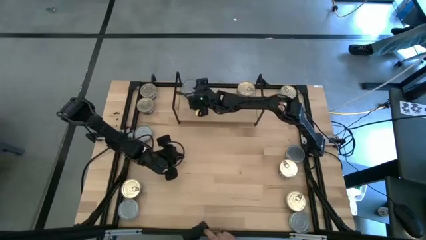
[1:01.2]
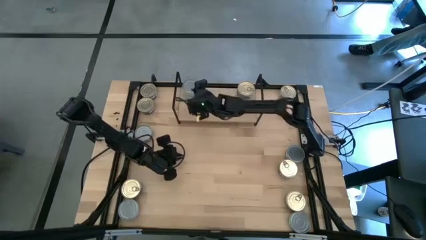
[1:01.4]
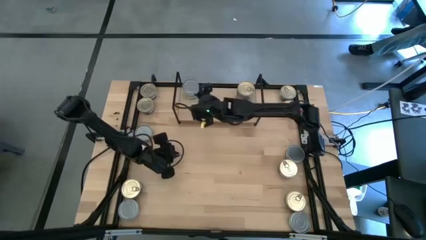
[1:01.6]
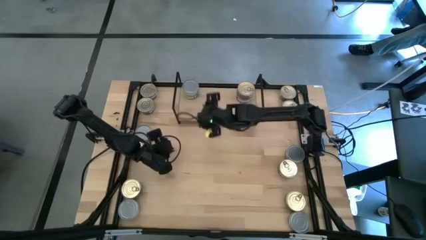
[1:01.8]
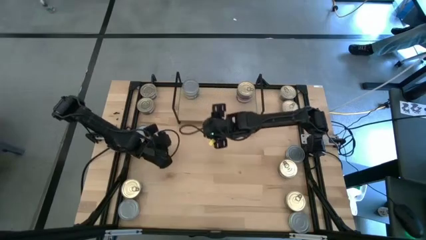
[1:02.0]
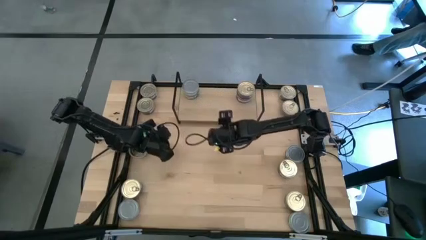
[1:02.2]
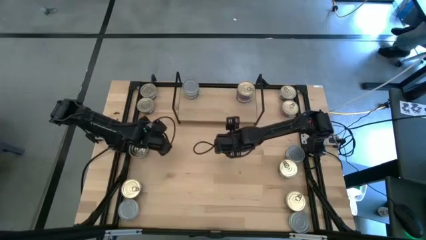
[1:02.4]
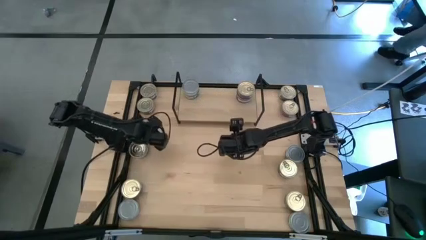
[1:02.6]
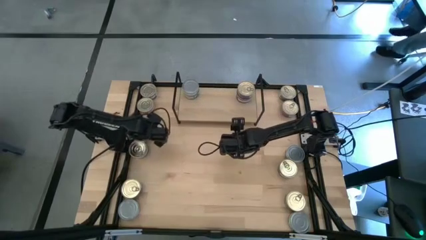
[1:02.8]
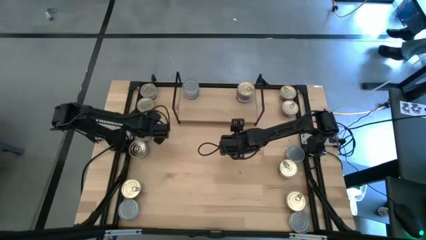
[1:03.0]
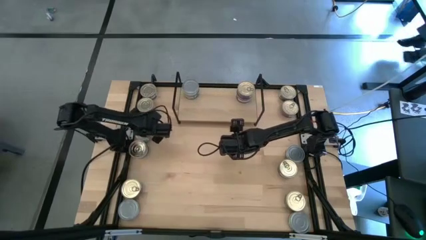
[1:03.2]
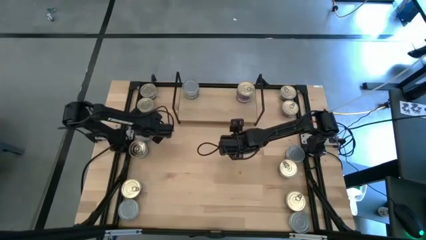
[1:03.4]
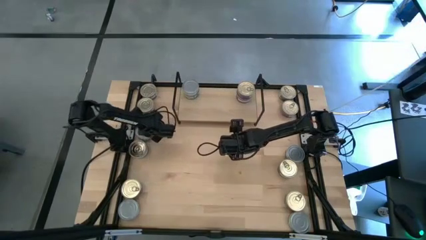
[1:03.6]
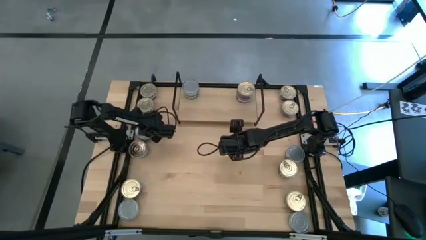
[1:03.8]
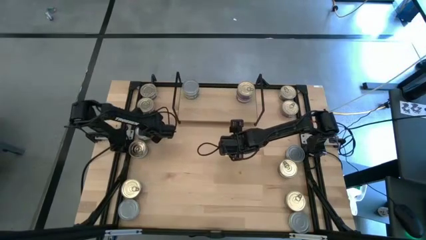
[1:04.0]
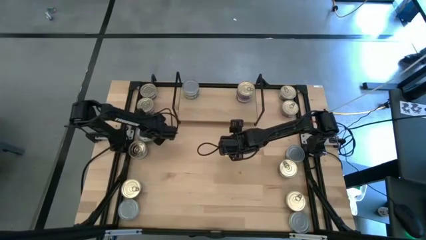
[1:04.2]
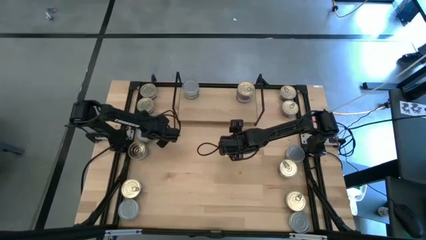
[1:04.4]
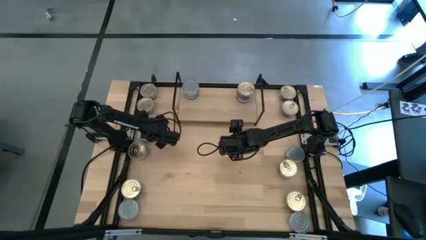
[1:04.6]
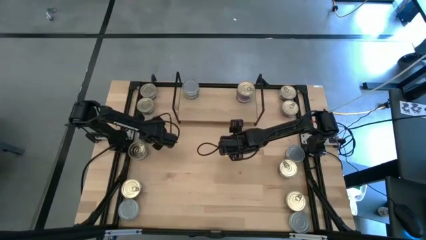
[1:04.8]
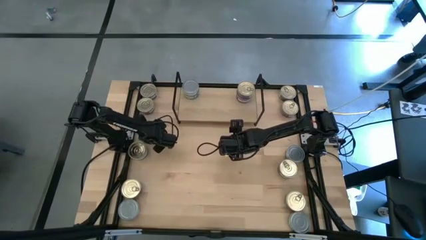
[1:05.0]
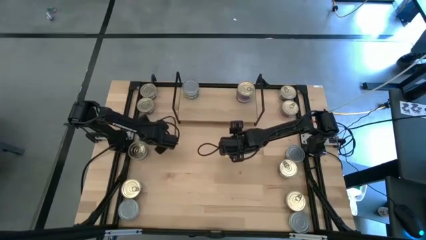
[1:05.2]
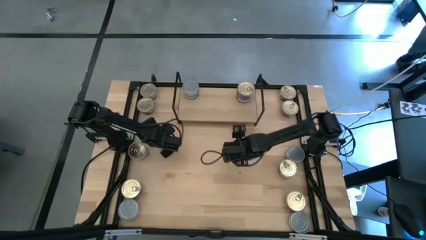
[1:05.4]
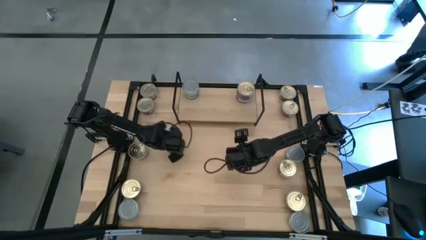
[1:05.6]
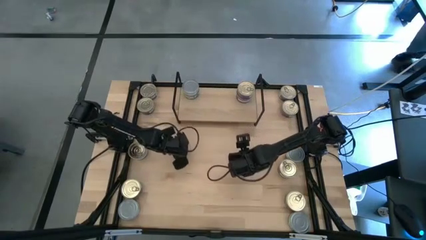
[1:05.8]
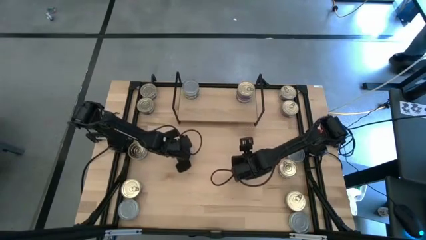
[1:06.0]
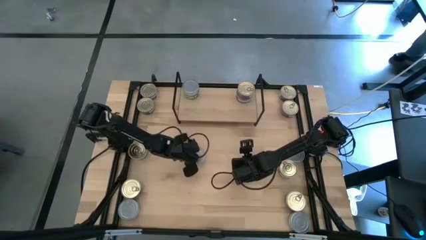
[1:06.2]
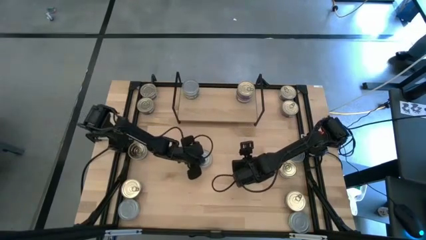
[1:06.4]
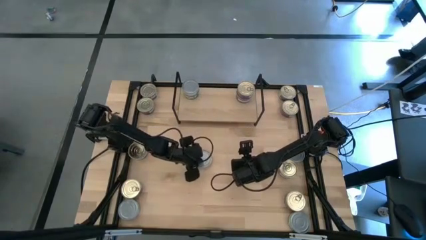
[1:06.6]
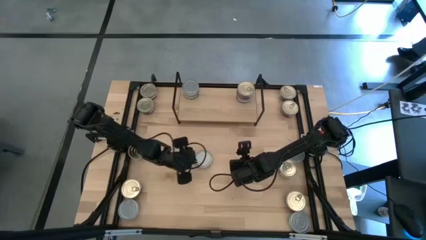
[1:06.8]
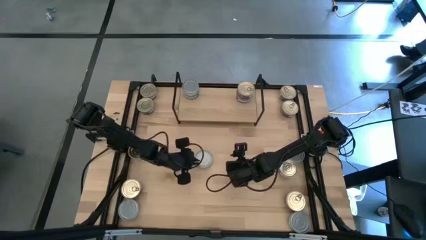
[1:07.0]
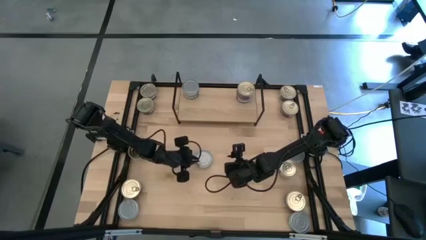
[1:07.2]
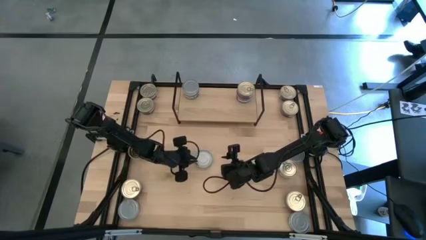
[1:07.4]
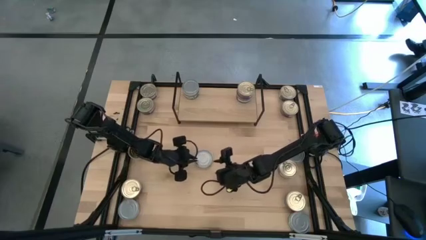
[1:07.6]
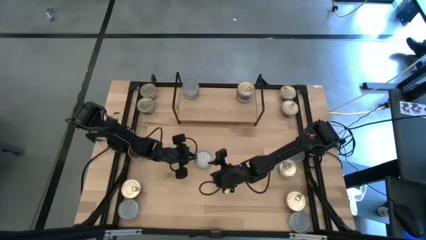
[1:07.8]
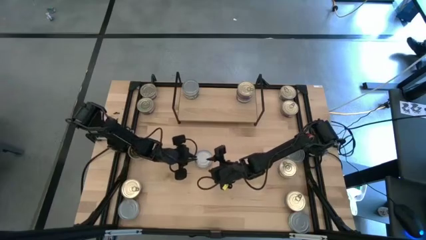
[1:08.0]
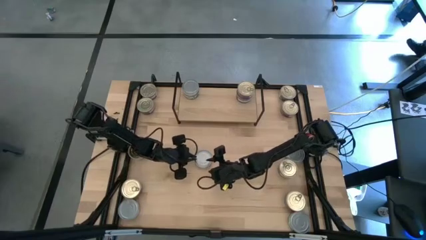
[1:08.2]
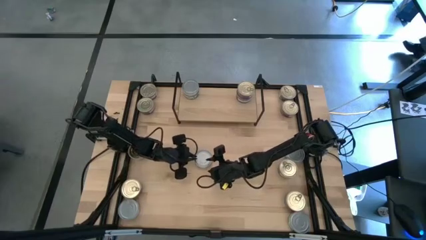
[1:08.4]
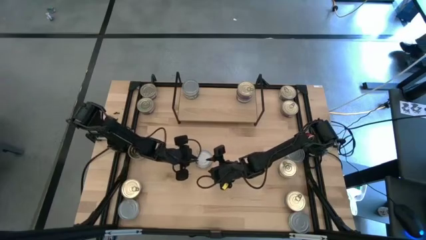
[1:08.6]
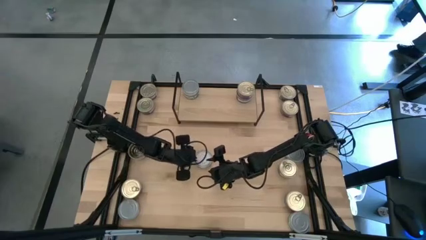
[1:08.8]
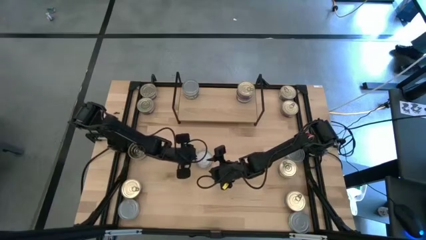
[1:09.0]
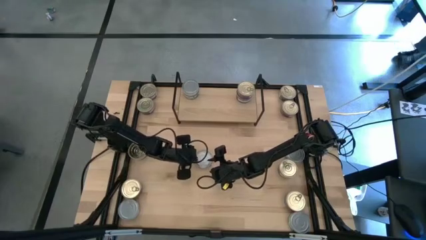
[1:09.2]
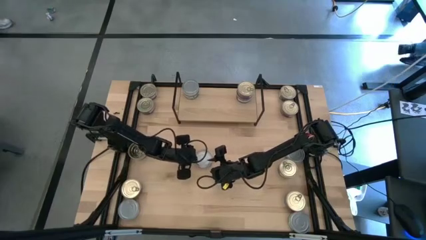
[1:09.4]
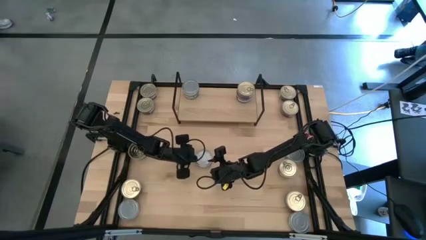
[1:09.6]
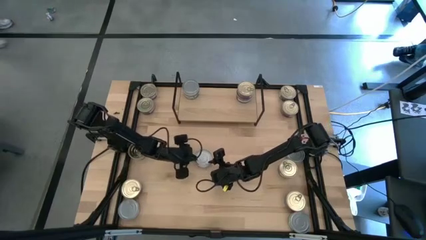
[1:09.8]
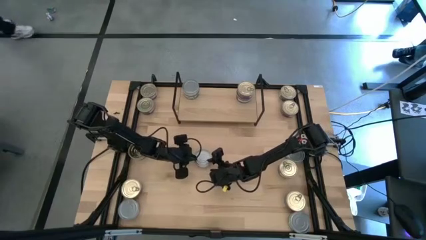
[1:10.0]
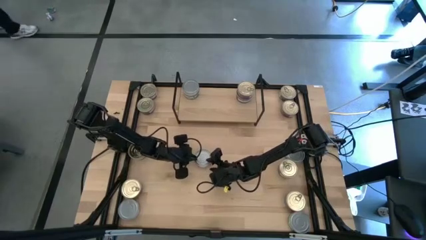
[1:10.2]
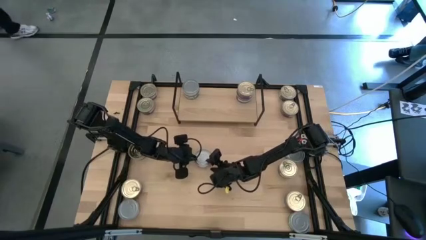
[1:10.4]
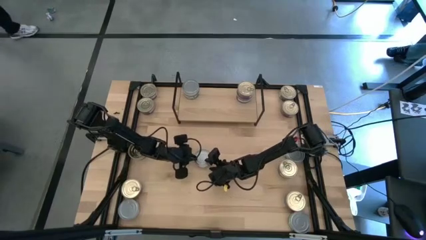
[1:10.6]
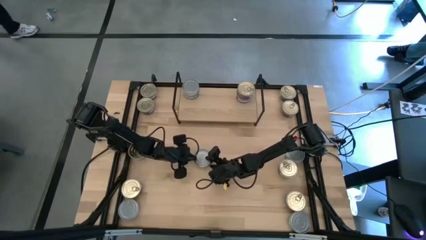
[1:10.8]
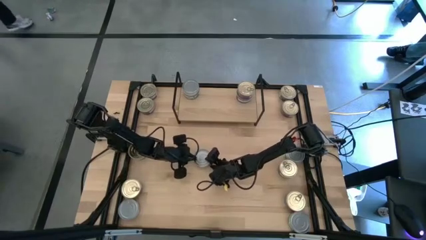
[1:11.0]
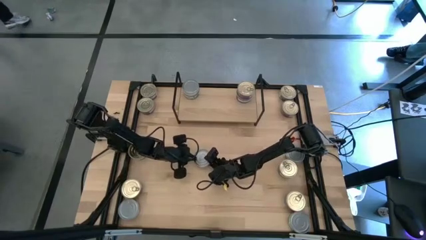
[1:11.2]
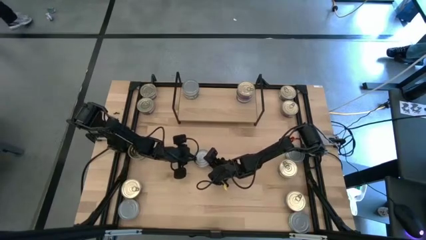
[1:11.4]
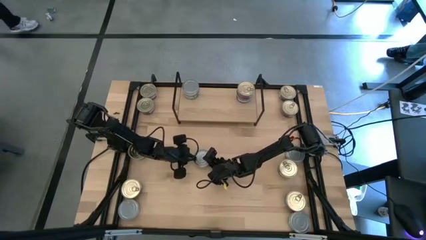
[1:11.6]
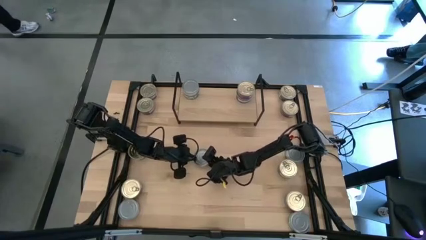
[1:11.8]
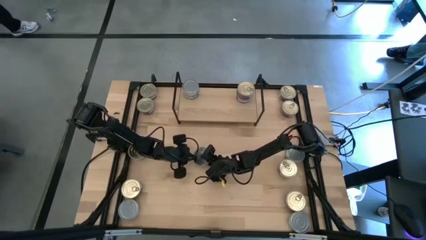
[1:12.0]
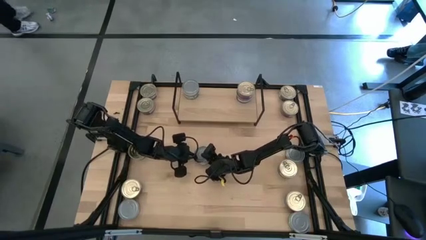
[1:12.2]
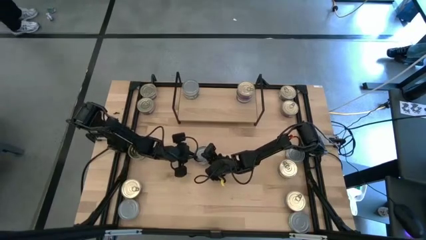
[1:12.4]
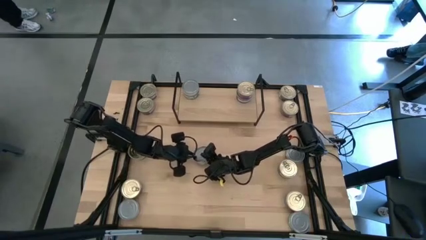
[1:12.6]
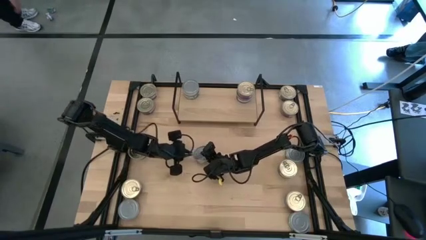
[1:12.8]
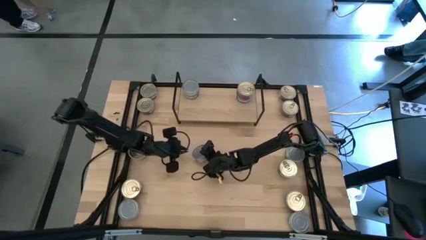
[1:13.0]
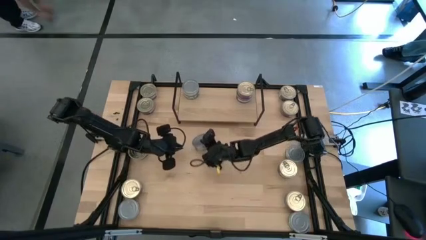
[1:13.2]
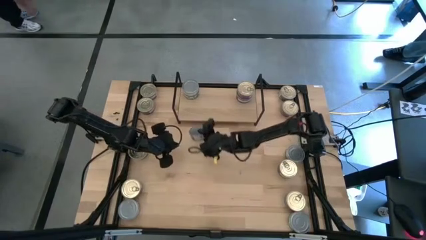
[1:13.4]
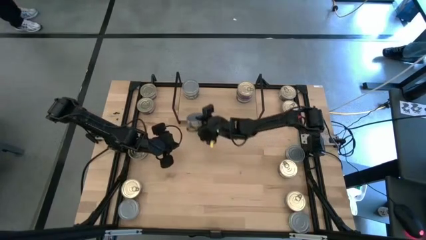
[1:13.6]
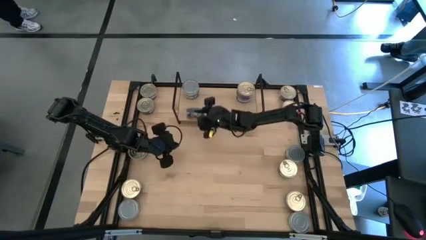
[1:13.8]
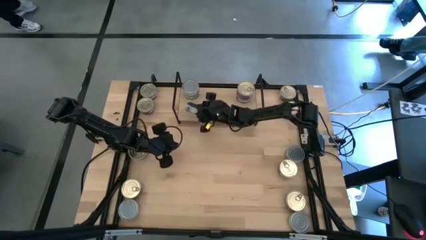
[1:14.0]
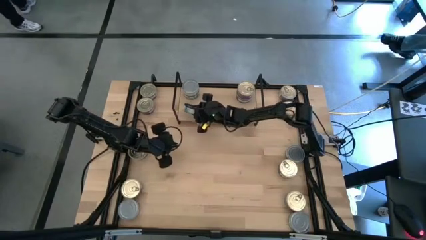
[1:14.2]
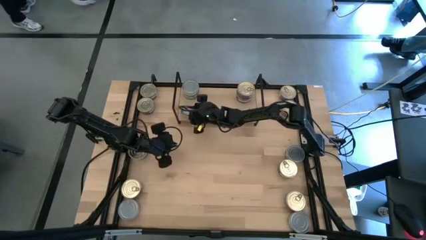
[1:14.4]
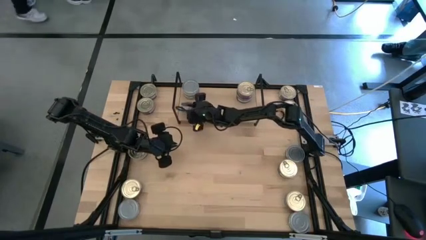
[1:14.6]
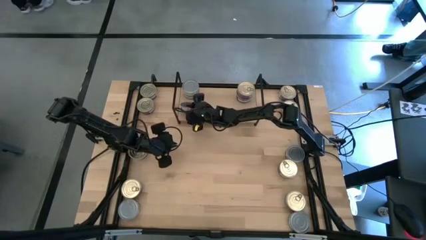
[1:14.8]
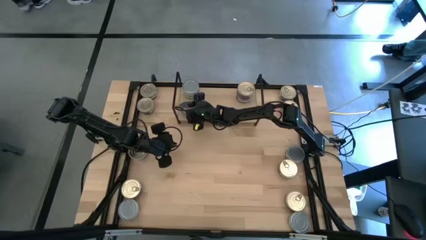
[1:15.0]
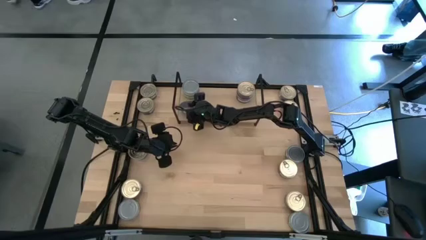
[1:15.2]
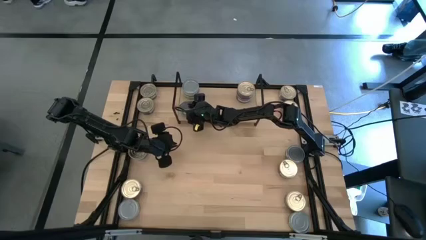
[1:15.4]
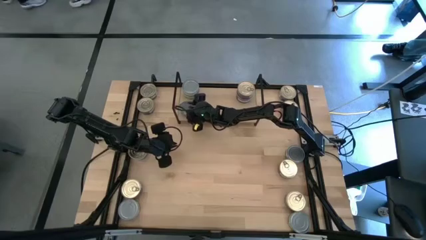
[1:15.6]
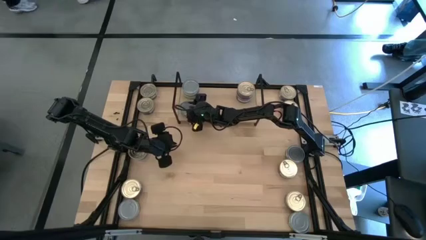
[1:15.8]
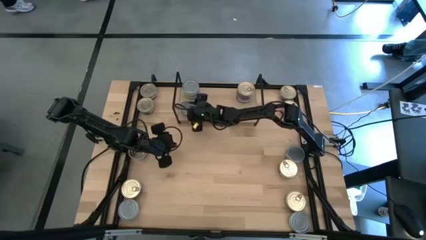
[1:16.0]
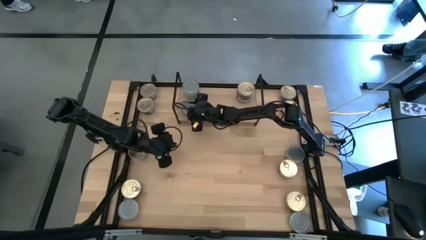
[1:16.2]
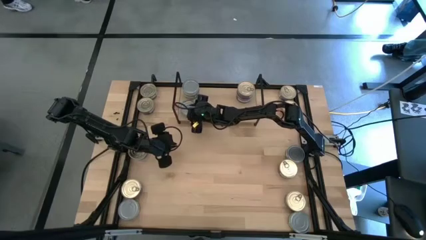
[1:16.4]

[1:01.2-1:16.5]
Task: Stack canned seafood by type on shelf
Put the green white tuna can on the shelf aligned with the stacked green white tuna cans

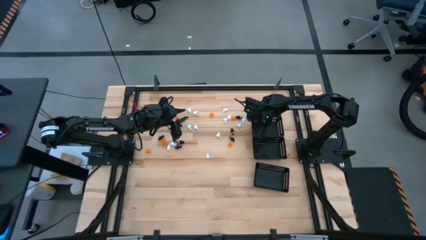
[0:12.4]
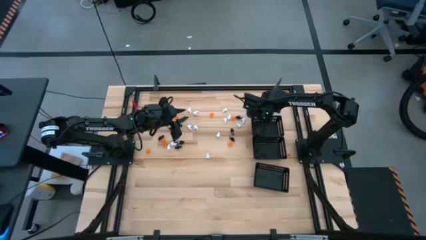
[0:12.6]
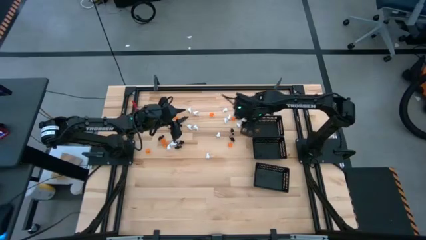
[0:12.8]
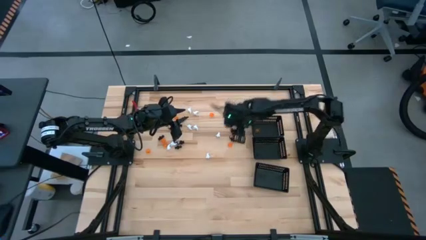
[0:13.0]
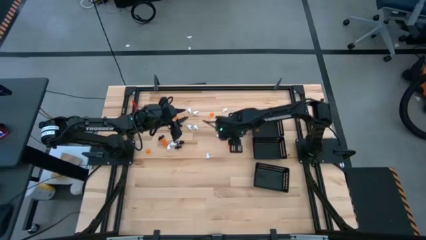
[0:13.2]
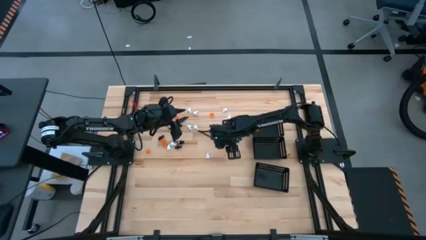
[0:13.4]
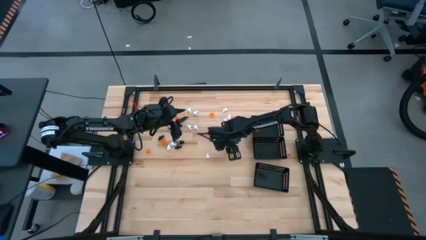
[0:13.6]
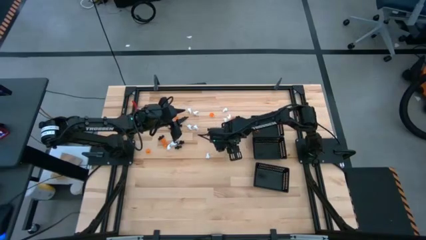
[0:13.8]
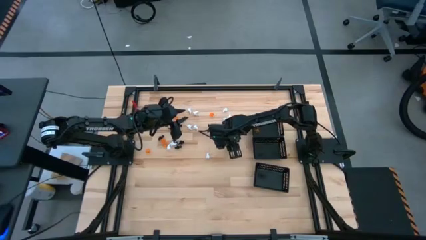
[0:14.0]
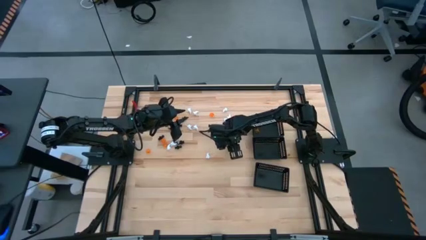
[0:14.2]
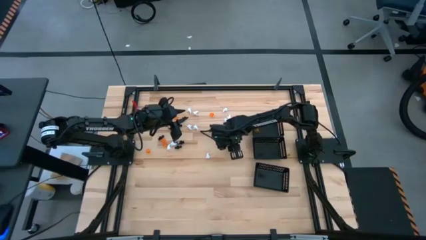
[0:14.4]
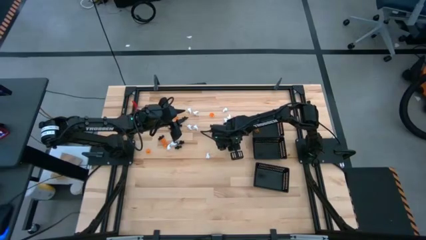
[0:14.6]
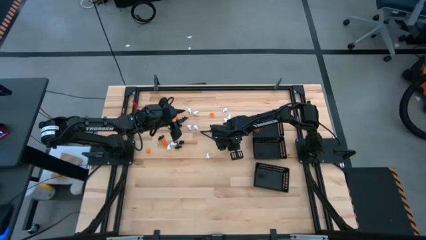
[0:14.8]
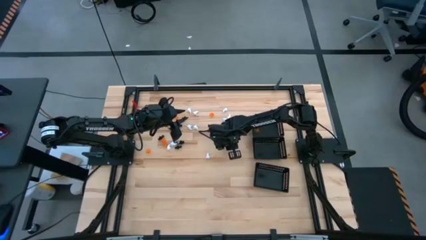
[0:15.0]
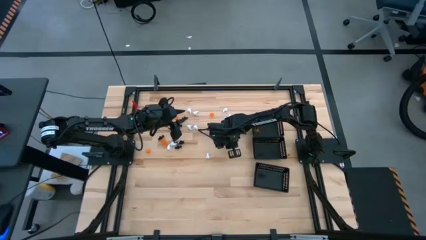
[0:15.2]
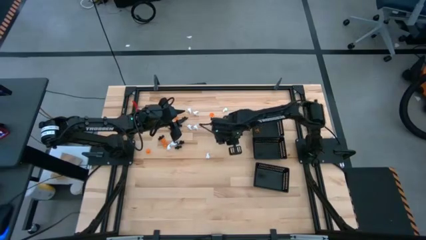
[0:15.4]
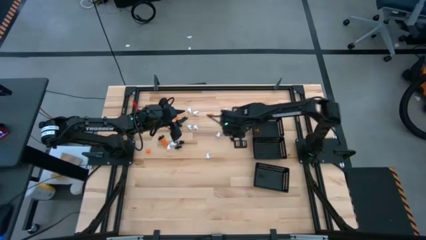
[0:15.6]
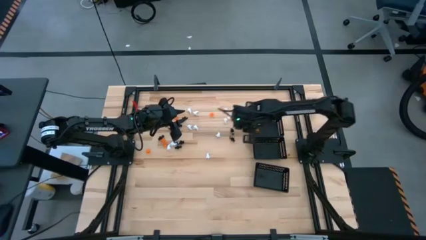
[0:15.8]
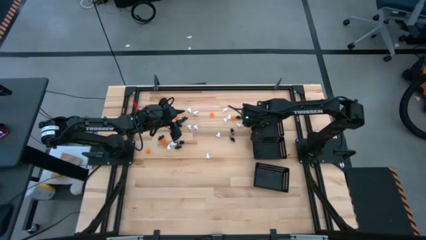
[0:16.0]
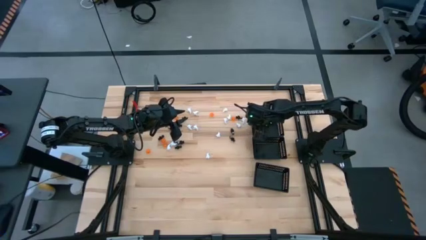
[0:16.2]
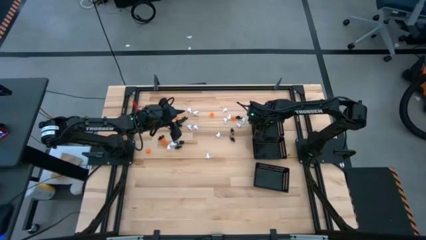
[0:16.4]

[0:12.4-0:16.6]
Task: Sort Halloween decoration
Put the orange pumpkin toy into the top black bin
